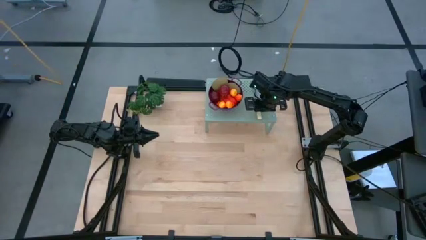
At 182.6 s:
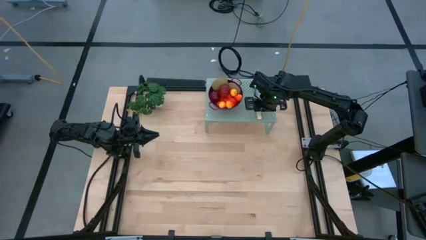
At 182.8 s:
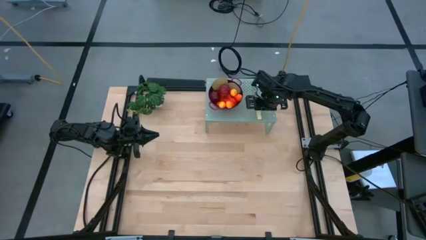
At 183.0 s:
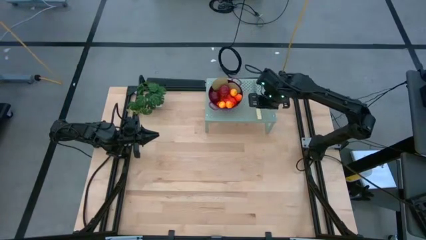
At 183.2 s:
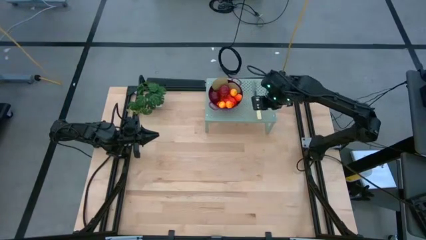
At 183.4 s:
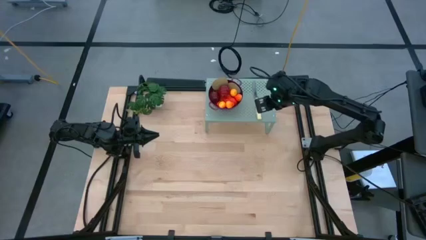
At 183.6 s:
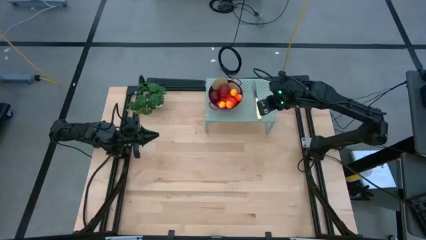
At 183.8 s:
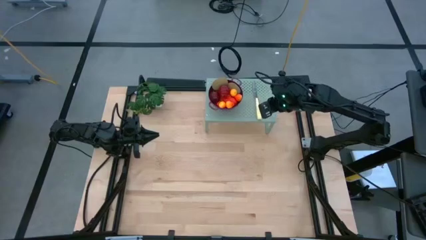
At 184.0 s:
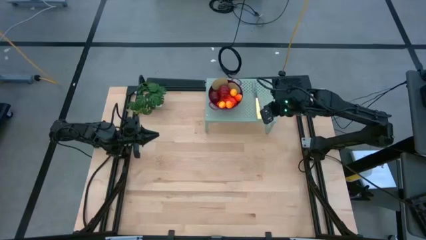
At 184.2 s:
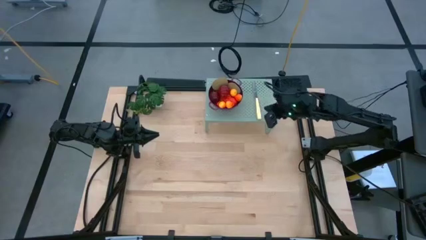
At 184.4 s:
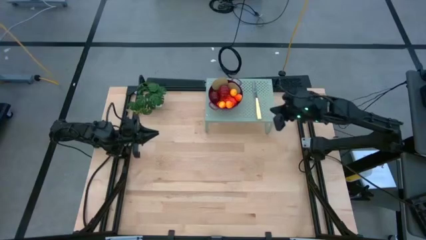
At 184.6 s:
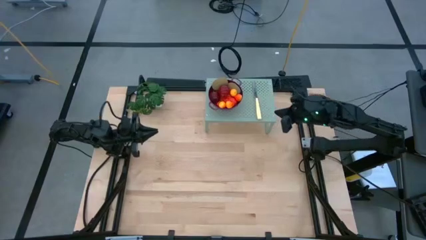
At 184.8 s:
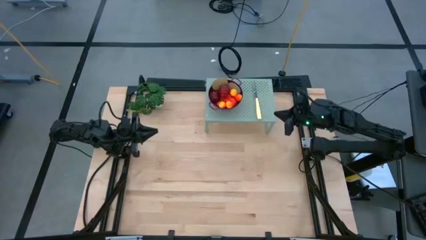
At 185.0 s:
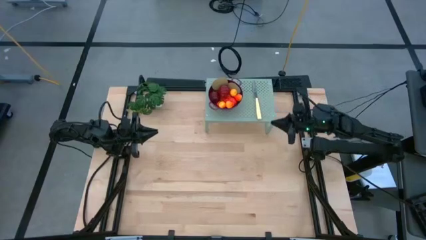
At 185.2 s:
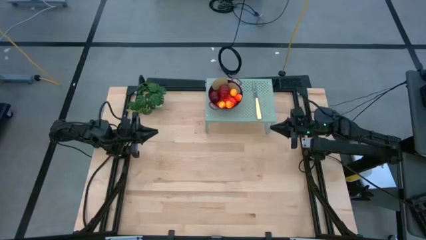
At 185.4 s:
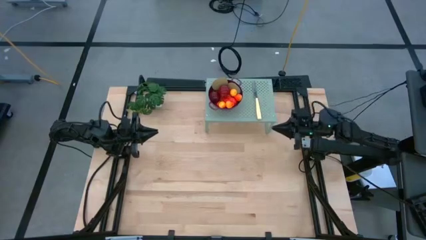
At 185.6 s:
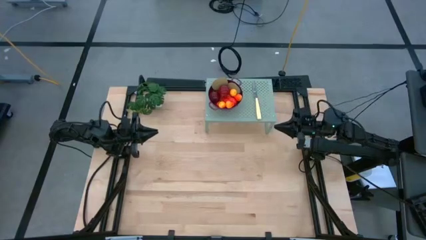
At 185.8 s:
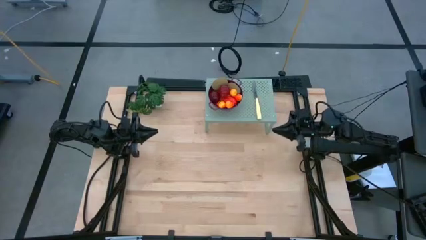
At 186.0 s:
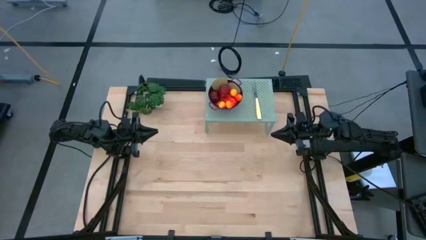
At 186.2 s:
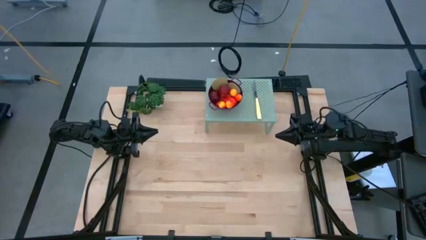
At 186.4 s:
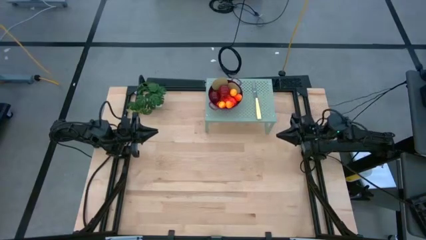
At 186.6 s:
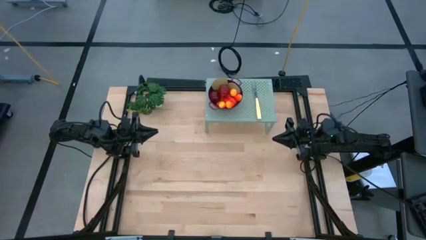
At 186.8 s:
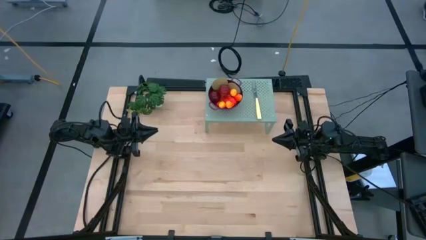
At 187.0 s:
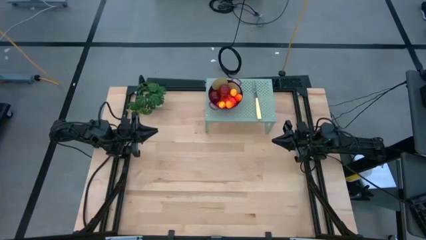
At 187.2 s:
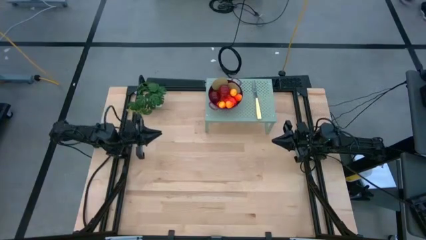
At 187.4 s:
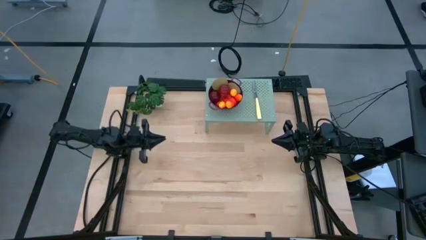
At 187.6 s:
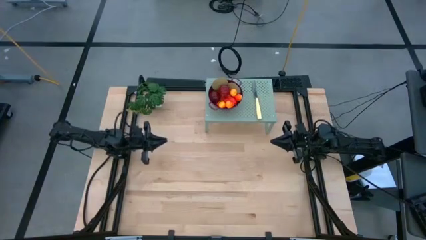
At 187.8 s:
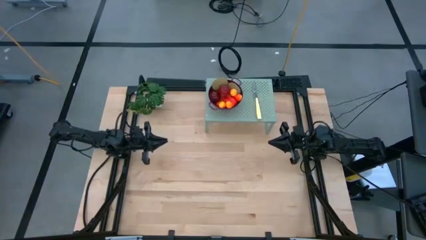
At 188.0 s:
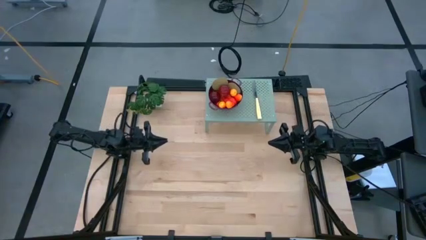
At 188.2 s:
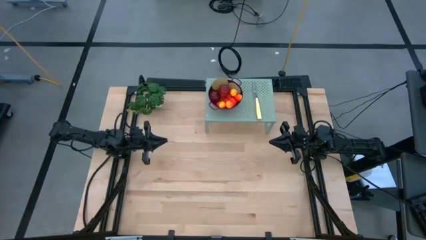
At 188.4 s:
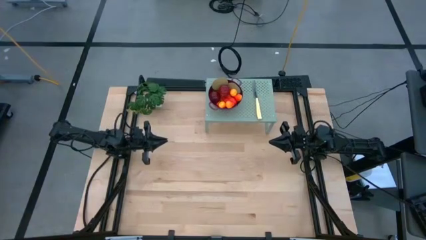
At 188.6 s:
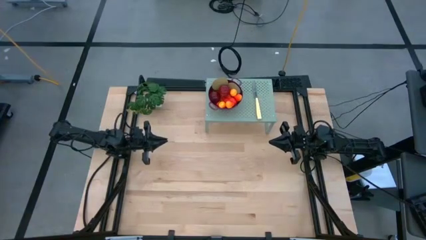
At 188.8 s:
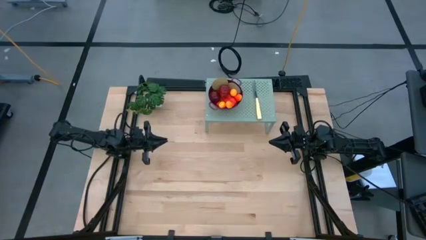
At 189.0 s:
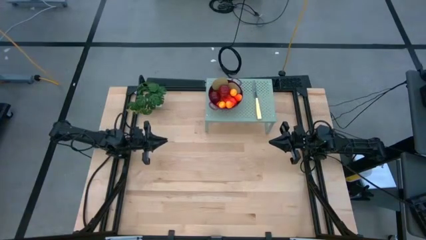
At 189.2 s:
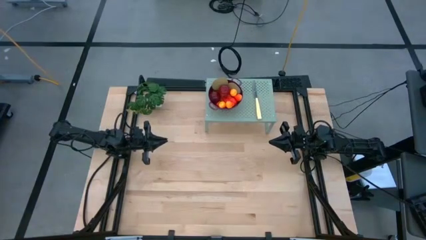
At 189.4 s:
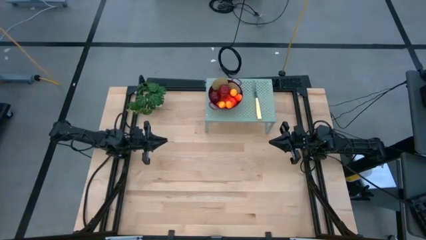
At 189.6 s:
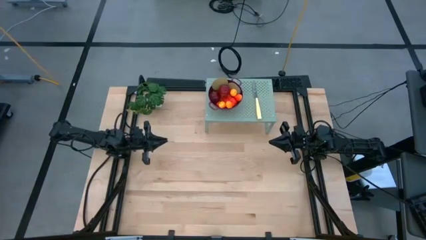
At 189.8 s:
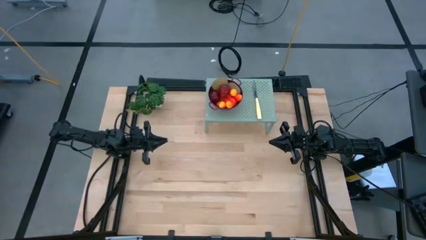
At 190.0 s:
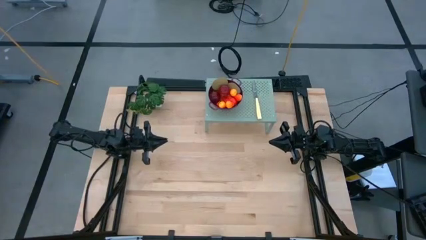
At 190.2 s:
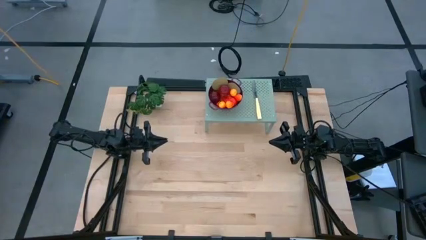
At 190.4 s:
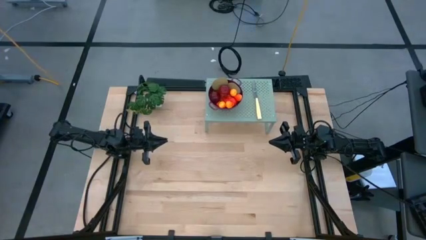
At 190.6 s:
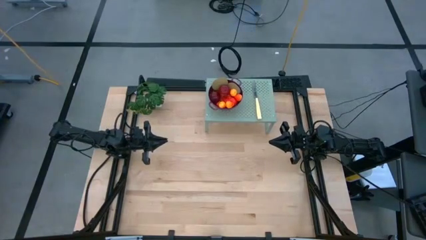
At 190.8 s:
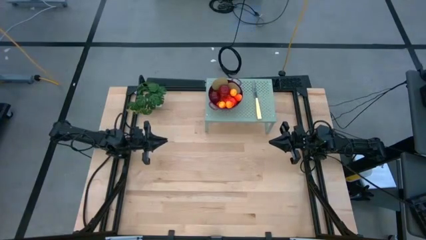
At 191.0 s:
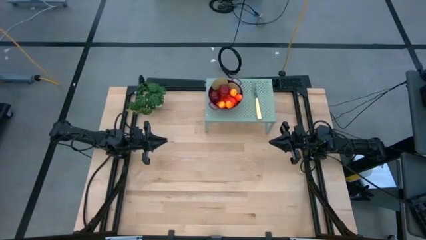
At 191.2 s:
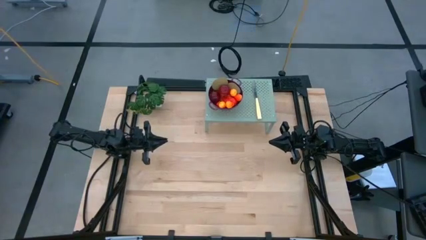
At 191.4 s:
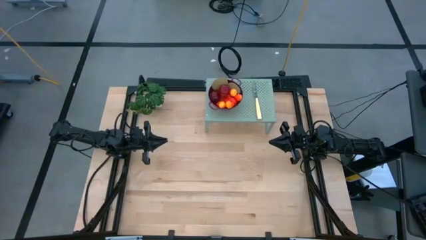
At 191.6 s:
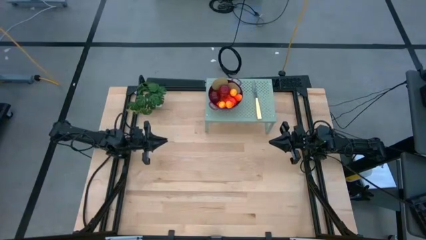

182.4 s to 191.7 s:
Task: Pick & Place Fruit
Return to Home Position
